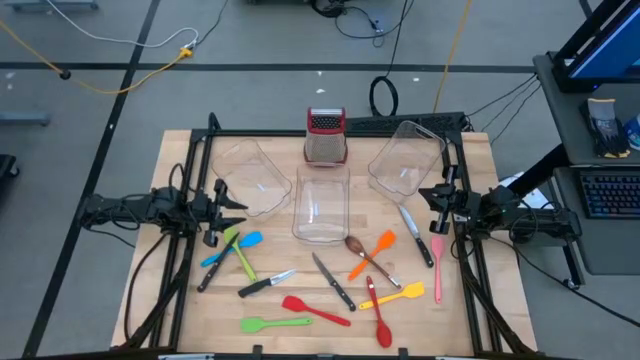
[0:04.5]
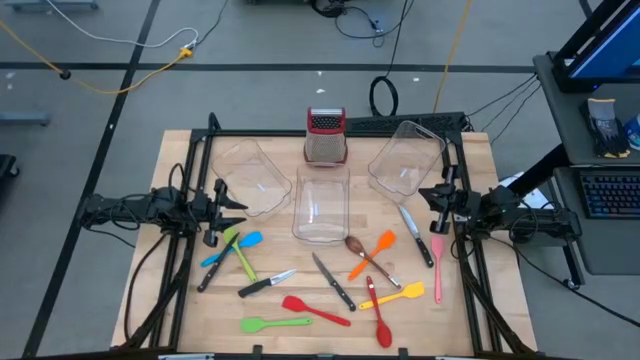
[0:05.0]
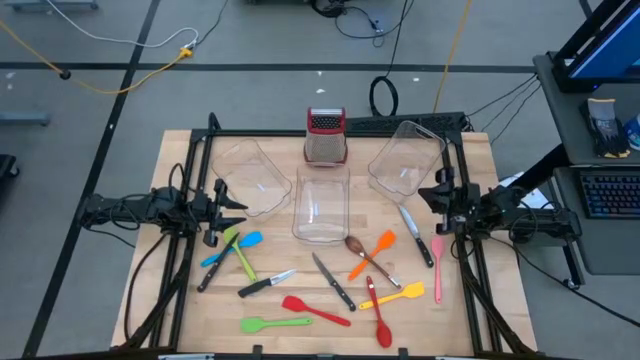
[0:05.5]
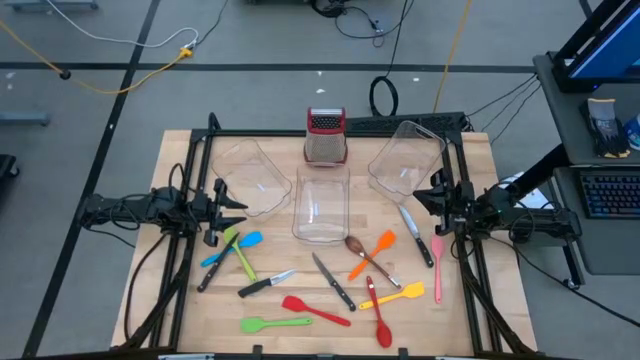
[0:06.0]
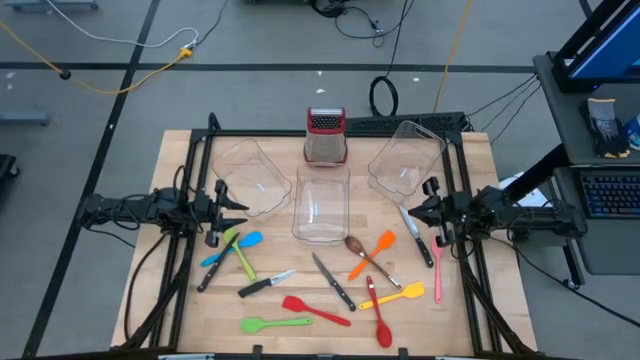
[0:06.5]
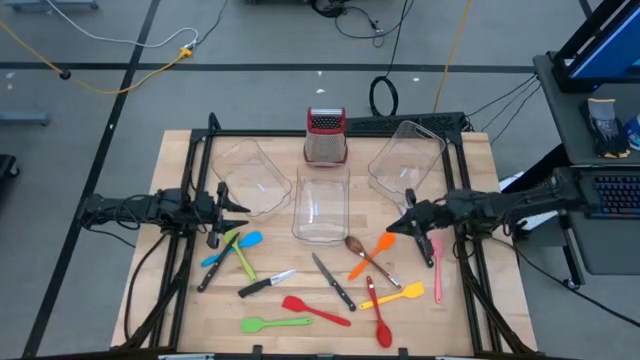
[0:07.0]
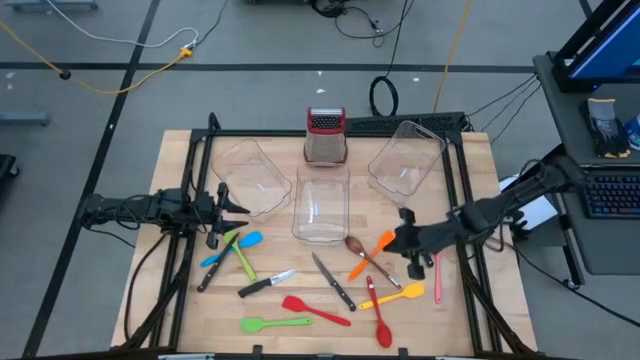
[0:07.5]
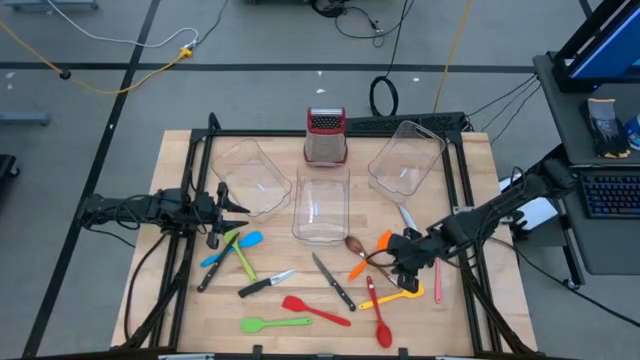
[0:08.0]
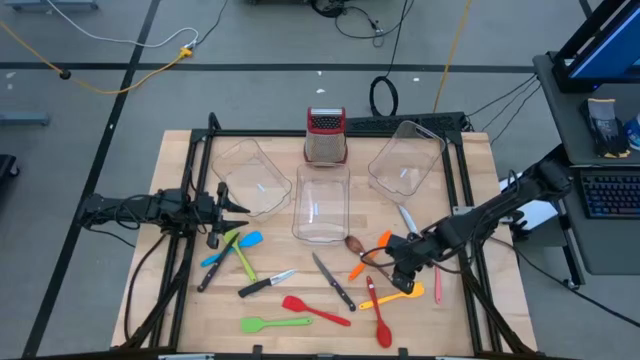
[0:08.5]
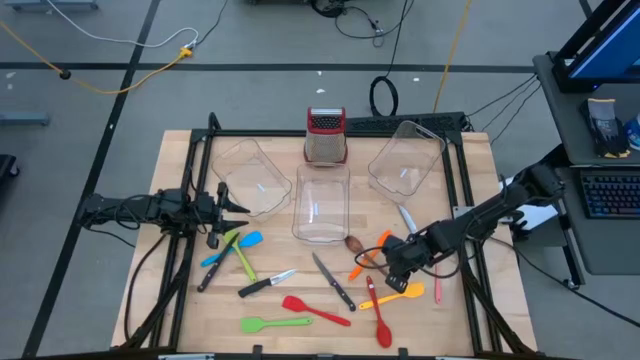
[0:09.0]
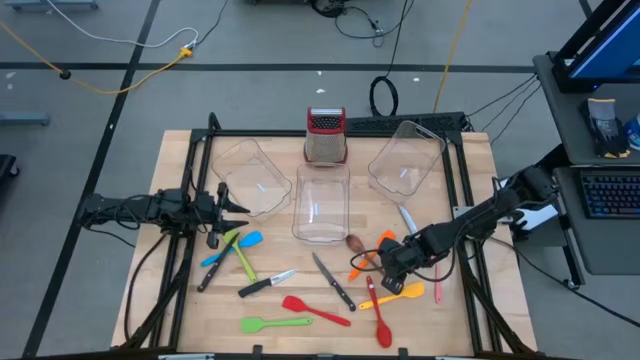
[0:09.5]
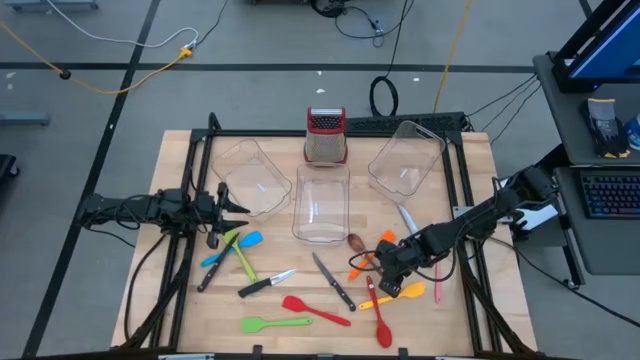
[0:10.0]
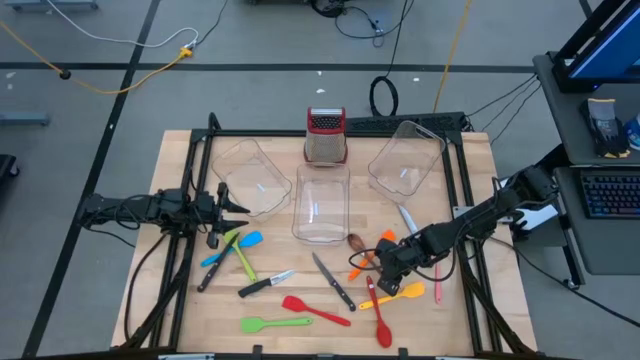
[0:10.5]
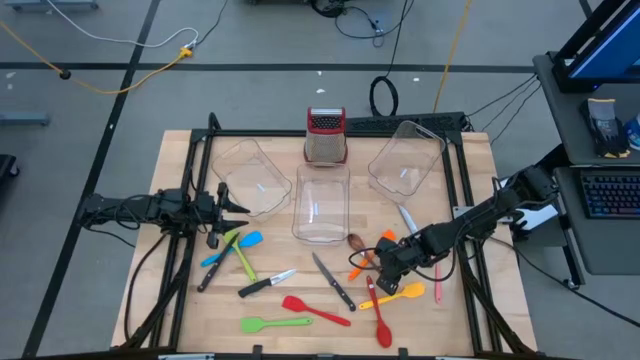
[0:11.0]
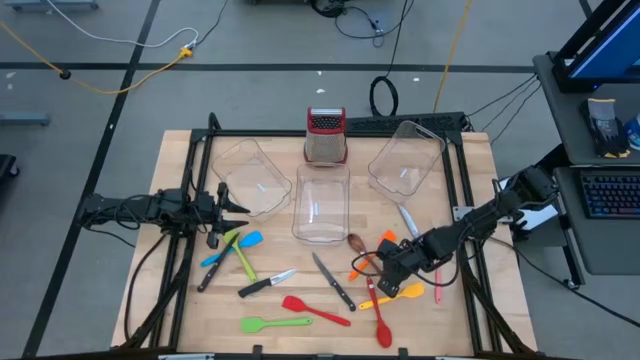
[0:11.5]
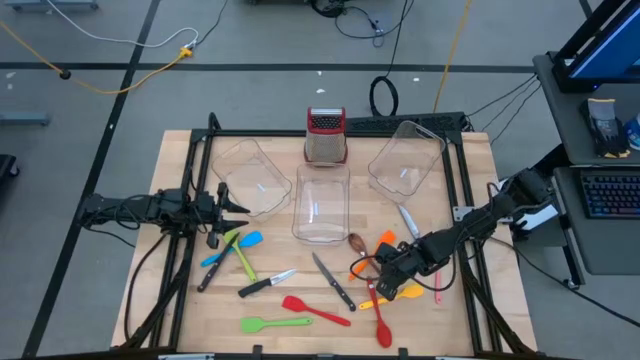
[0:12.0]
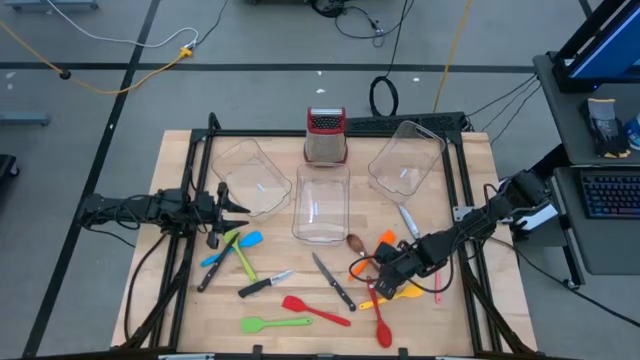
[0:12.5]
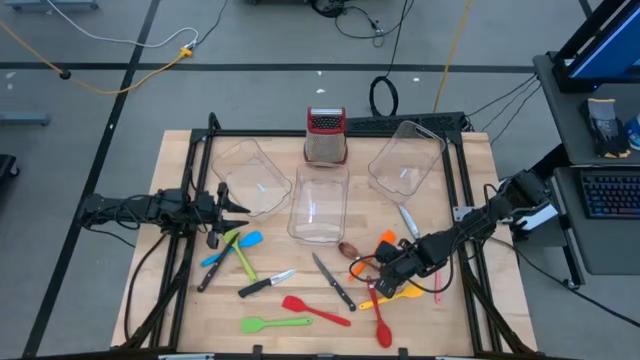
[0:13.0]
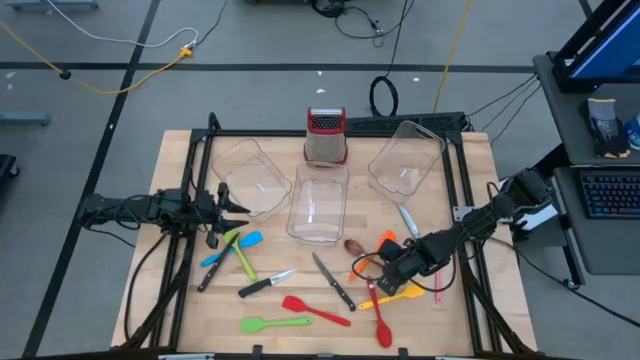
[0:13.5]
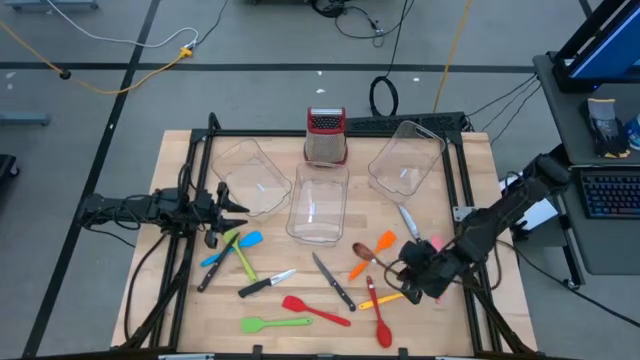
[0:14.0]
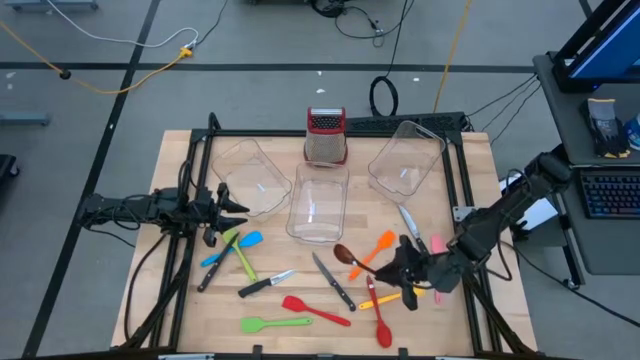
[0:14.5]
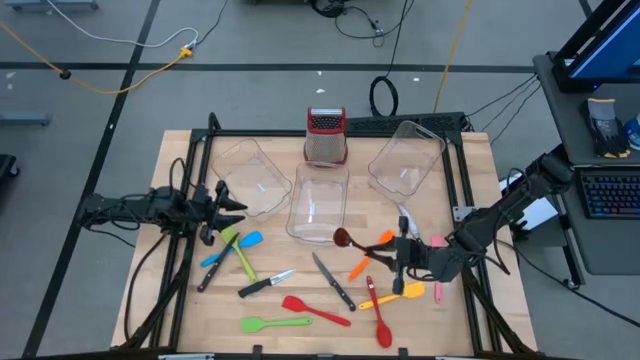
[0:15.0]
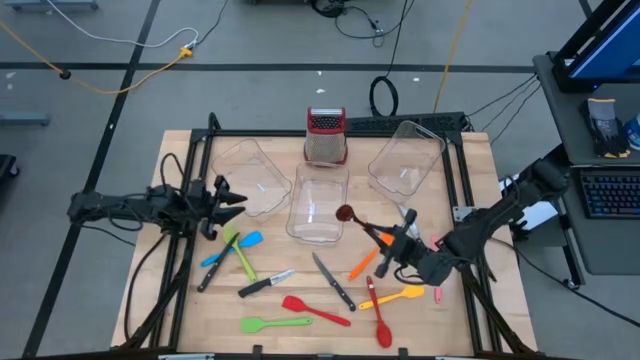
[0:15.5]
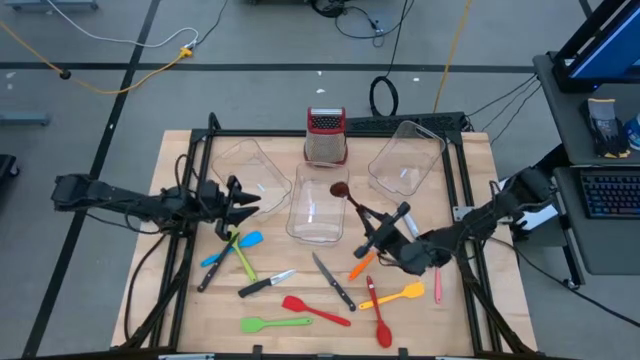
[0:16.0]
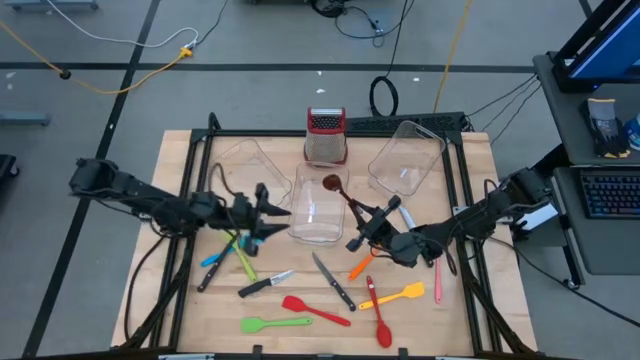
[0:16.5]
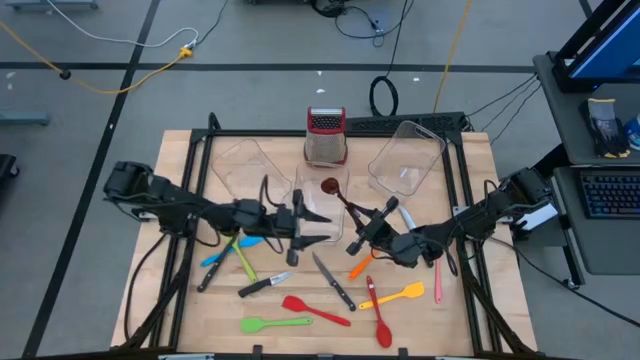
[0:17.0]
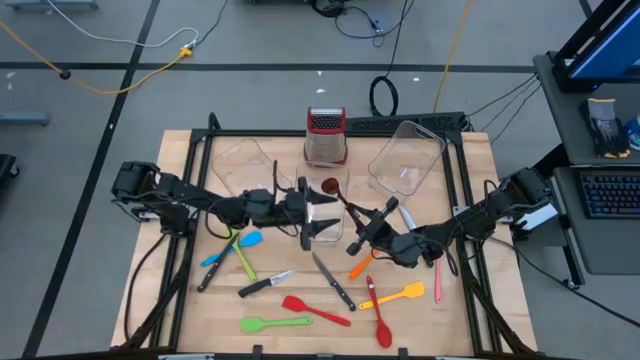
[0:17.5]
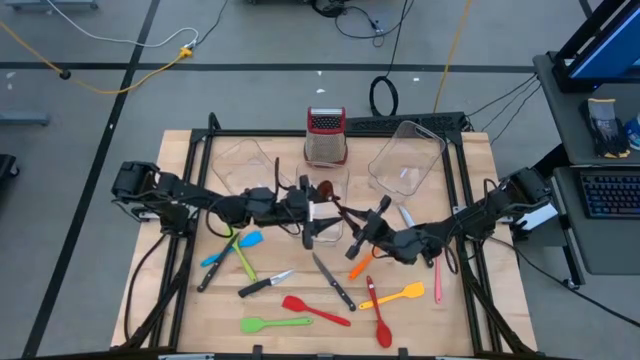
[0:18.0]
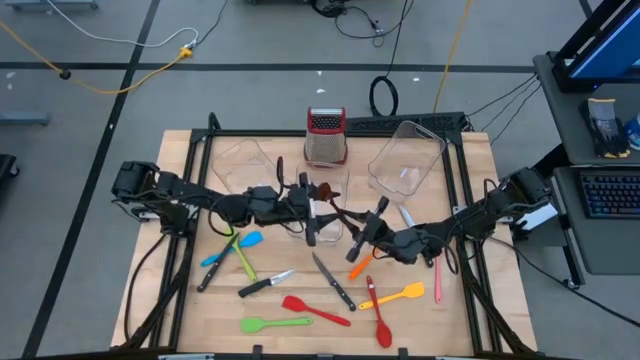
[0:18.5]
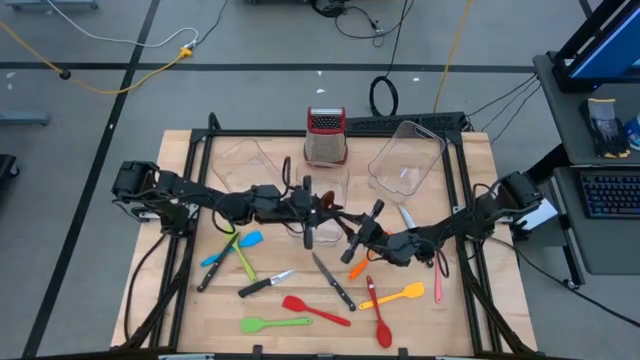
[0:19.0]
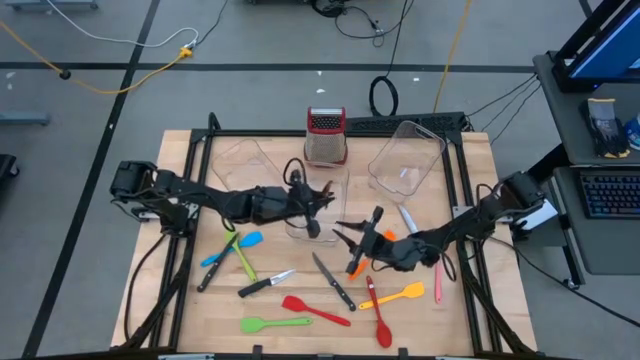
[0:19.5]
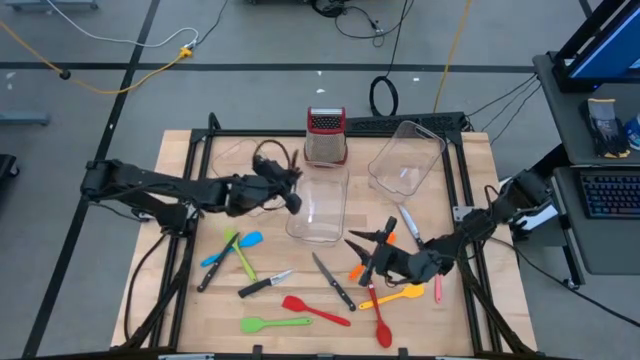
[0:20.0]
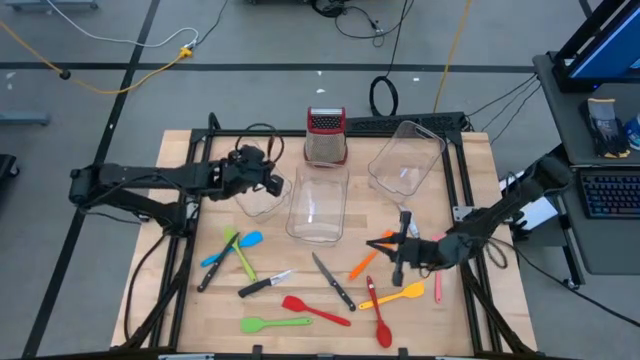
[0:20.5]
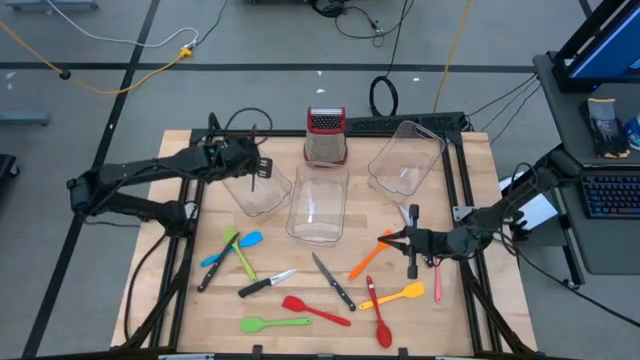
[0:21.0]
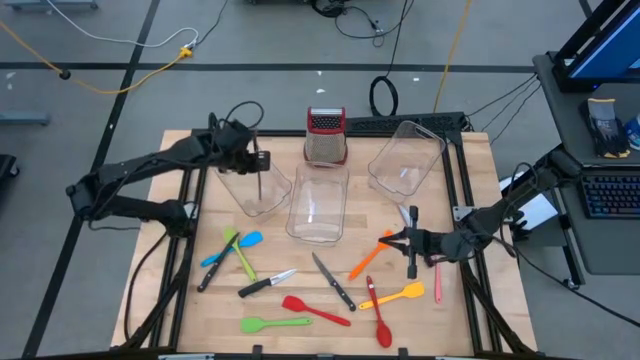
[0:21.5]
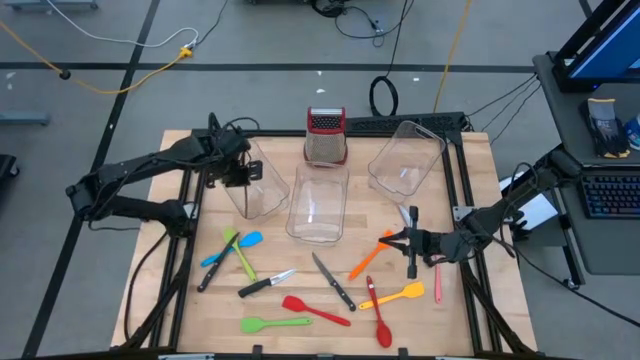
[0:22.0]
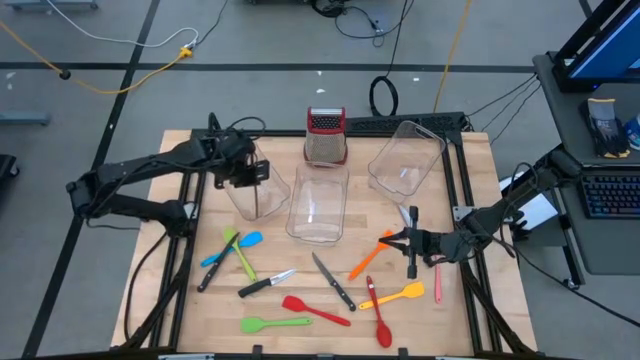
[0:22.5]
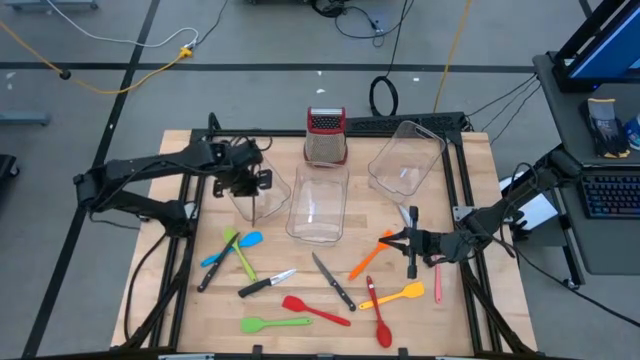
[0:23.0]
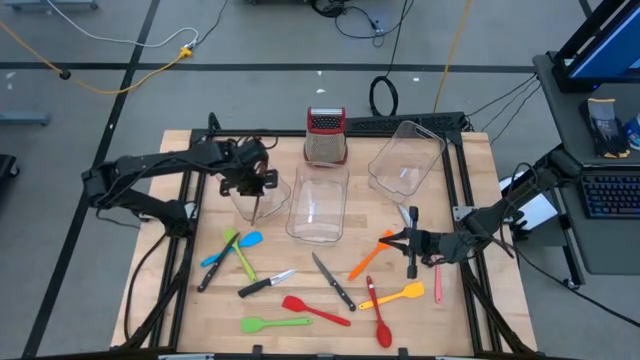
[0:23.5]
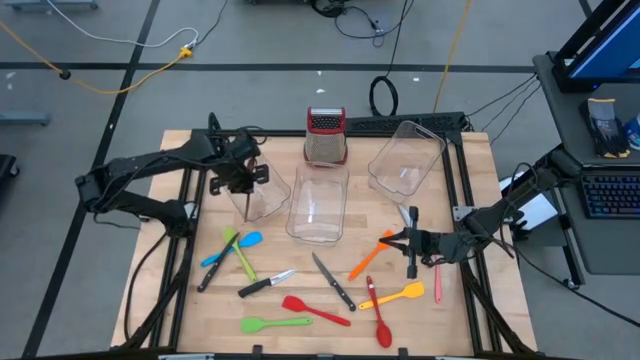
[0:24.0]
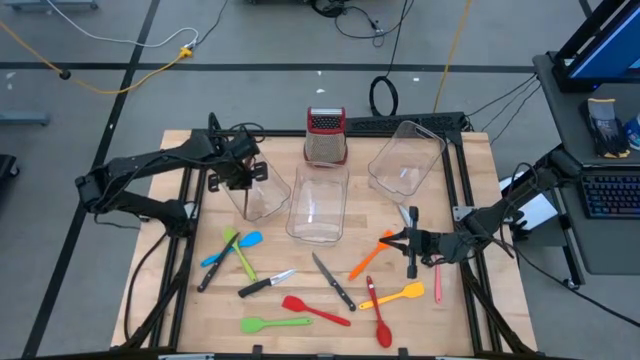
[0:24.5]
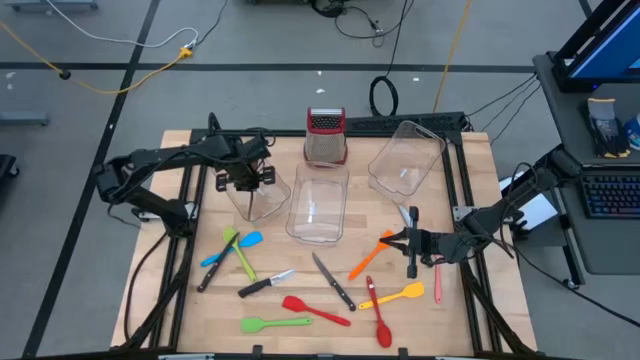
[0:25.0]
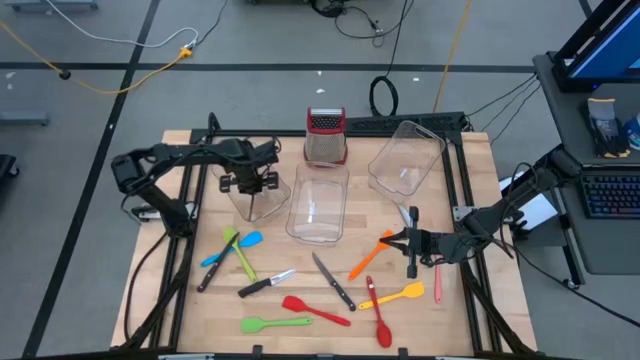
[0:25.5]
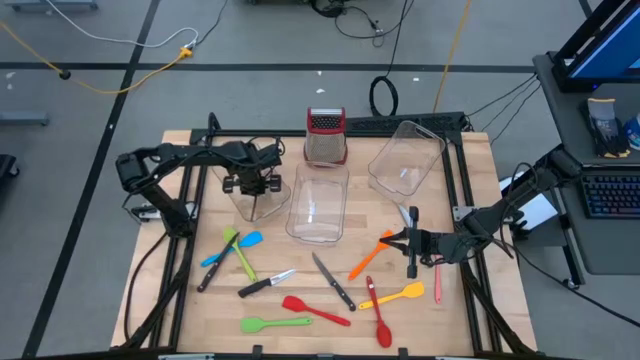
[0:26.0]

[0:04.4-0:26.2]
Task: Pick & Place Kitchen Items
Put the brown ladle into the left transparent bin
